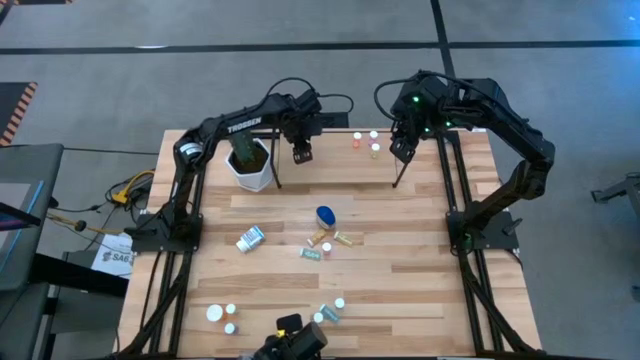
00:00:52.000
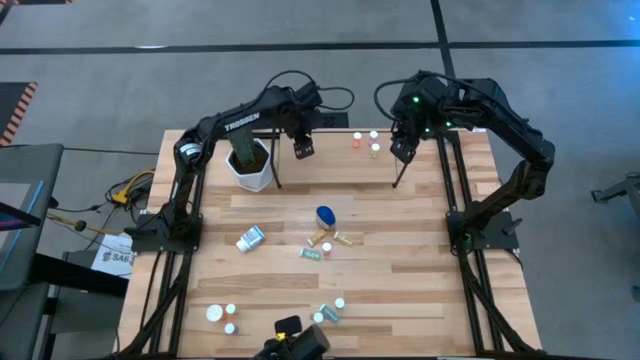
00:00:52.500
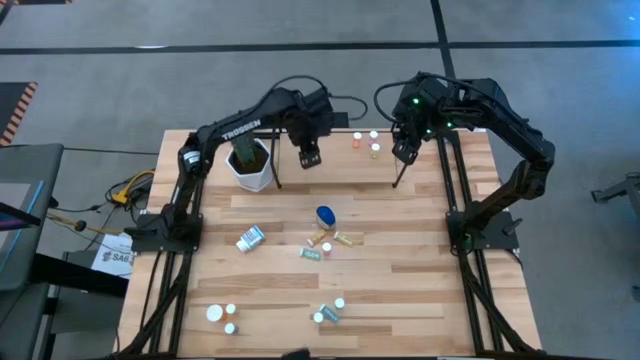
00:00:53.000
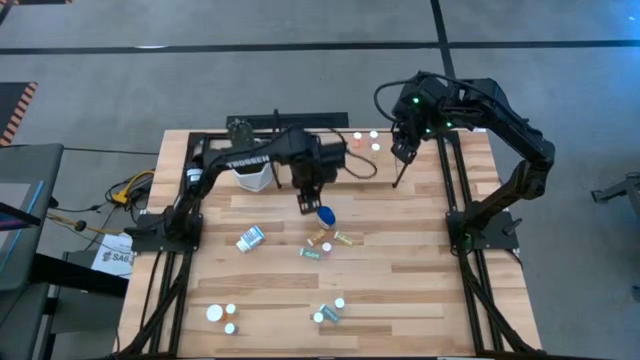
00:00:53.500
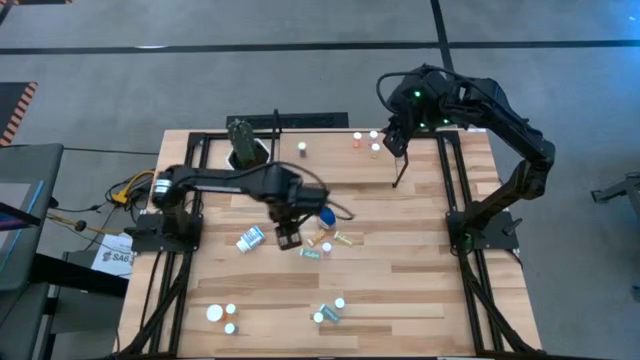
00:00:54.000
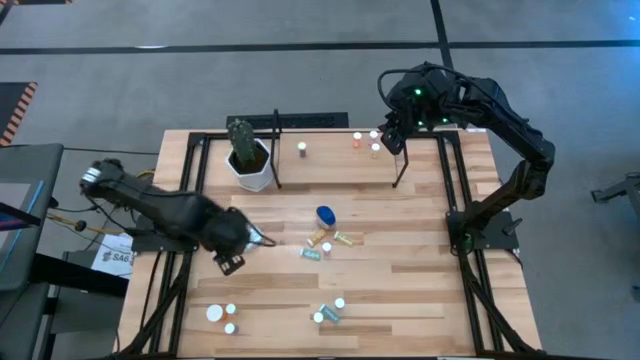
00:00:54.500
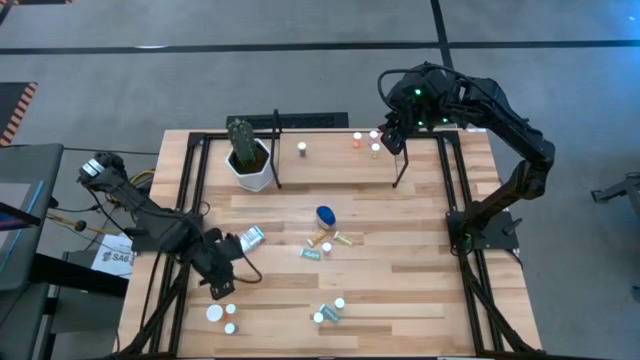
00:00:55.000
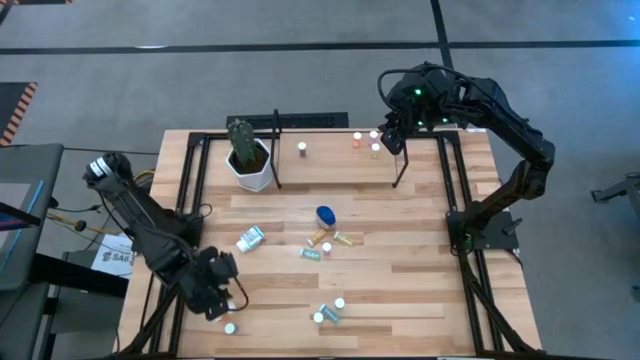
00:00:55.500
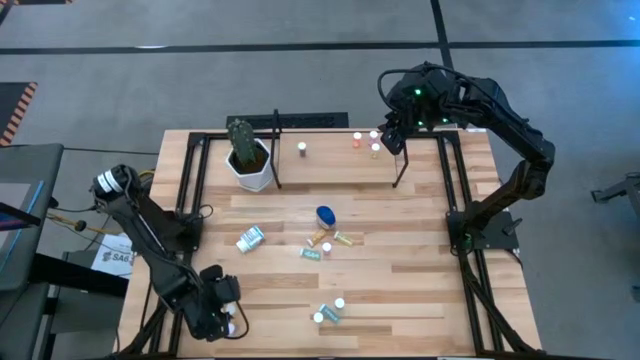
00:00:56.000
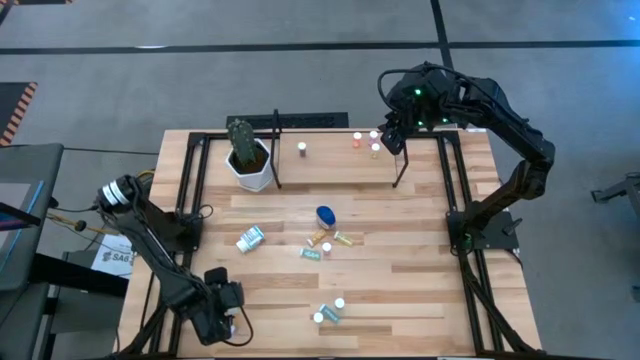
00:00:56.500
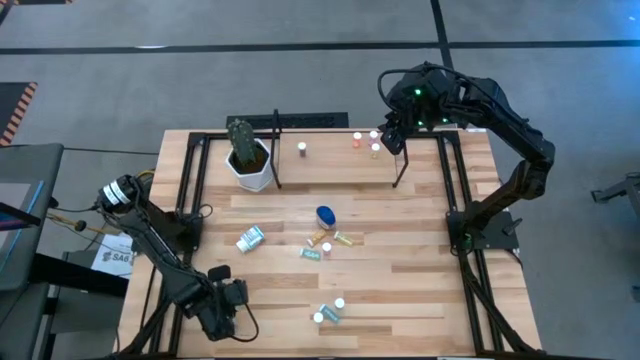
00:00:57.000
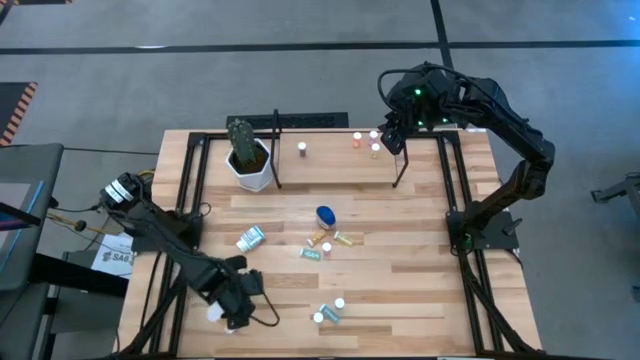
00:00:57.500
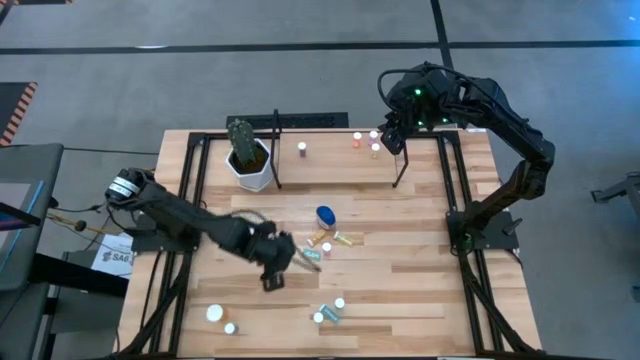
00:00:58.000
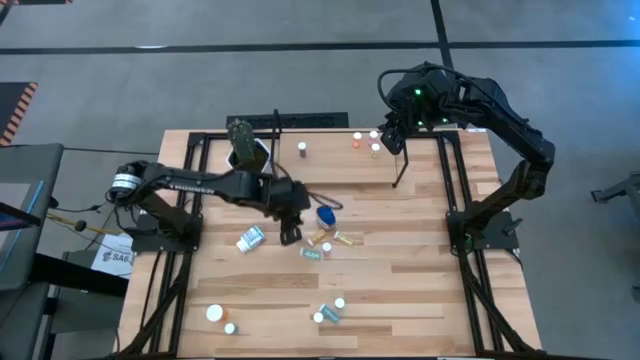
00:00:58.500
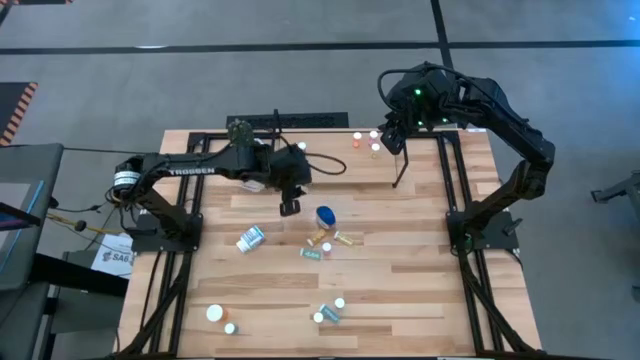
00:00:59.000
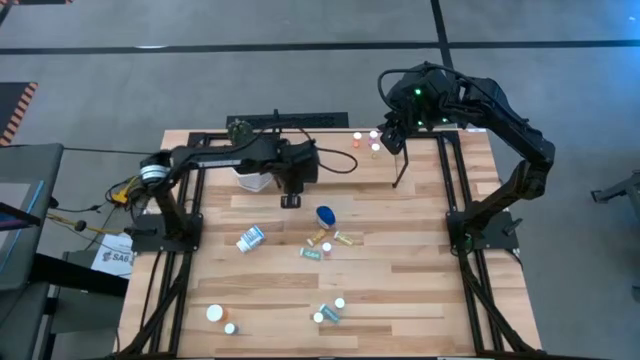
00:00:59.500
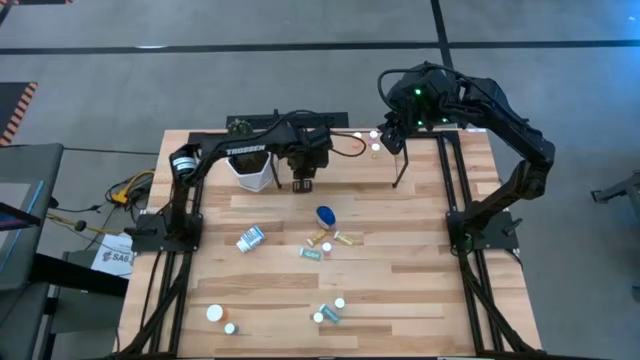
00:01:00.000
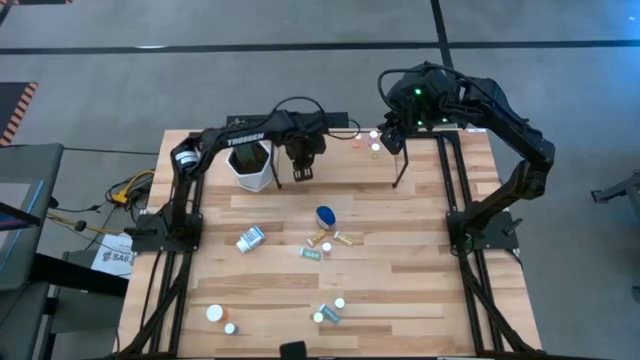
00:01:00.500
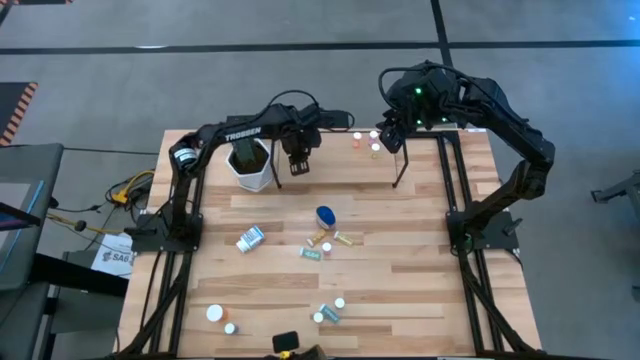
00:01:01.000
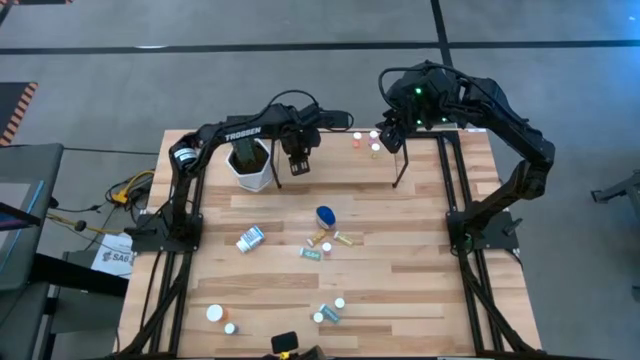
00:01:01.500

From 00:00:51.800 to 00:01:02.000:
Task: Pick and place medicine bottles onto shelf by color
Put the yellow pill bottle on the shelf

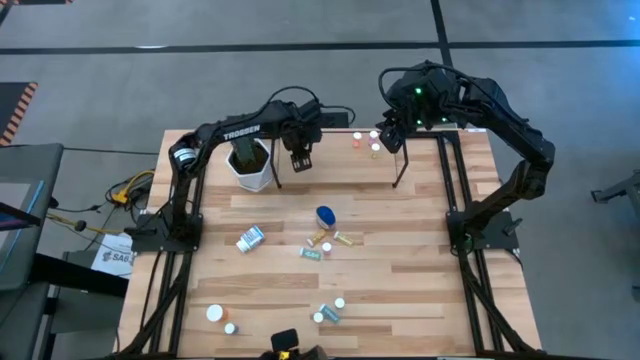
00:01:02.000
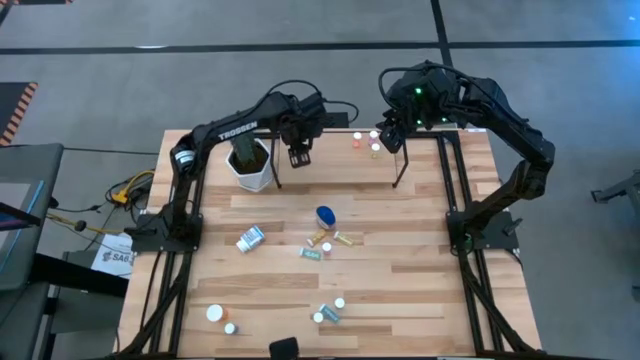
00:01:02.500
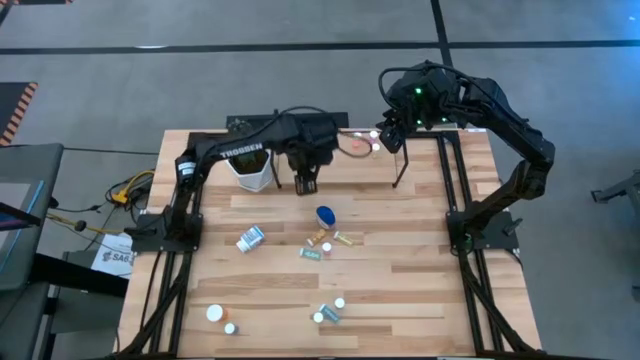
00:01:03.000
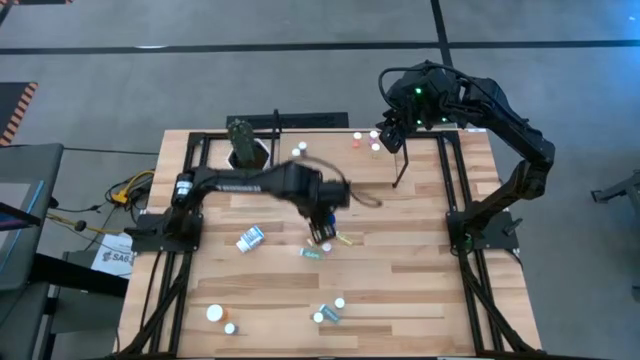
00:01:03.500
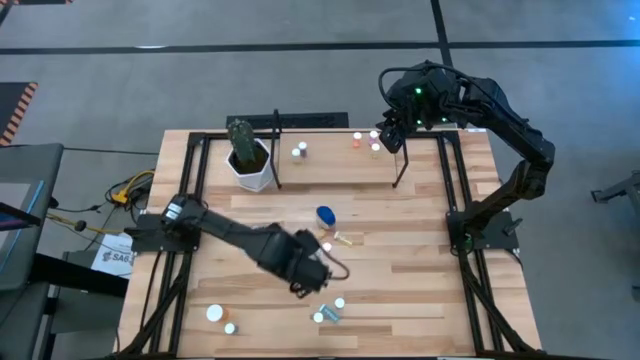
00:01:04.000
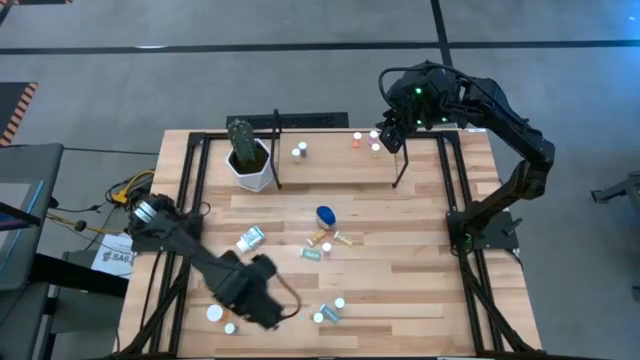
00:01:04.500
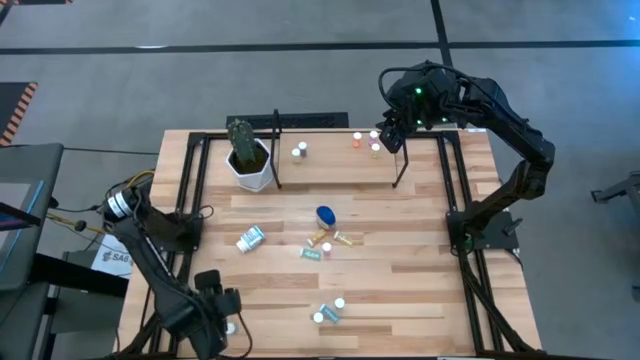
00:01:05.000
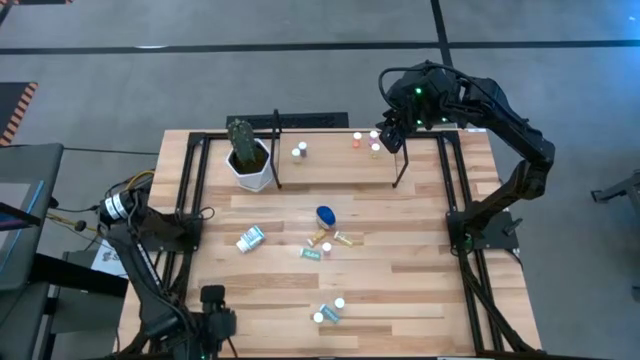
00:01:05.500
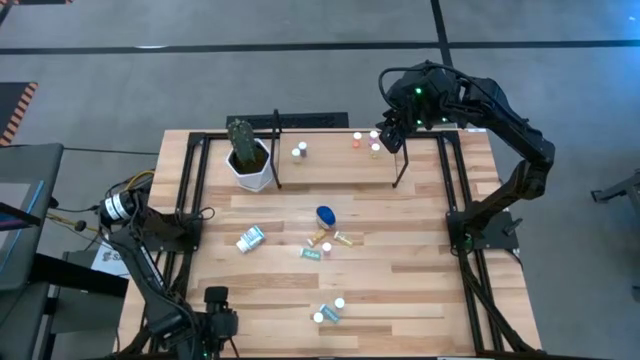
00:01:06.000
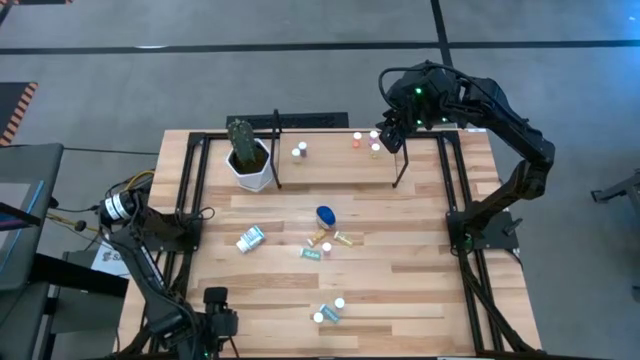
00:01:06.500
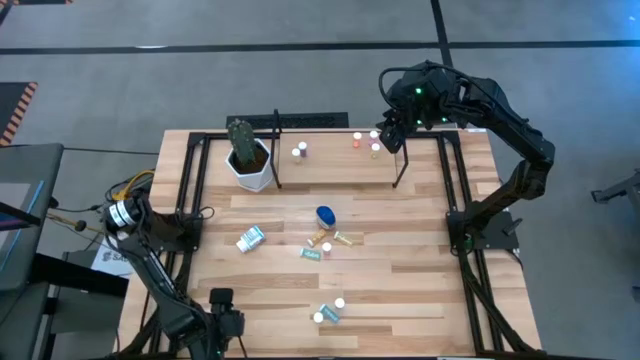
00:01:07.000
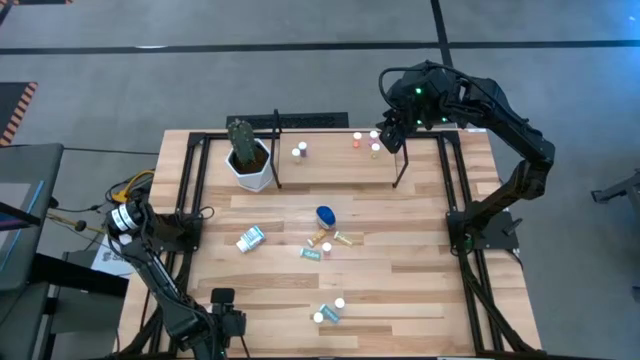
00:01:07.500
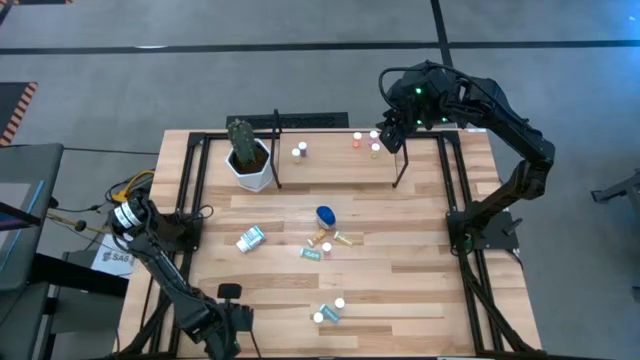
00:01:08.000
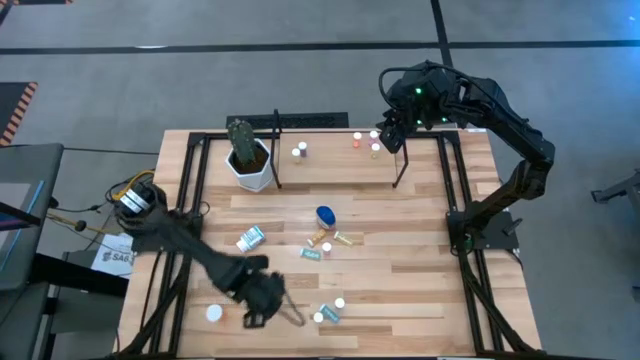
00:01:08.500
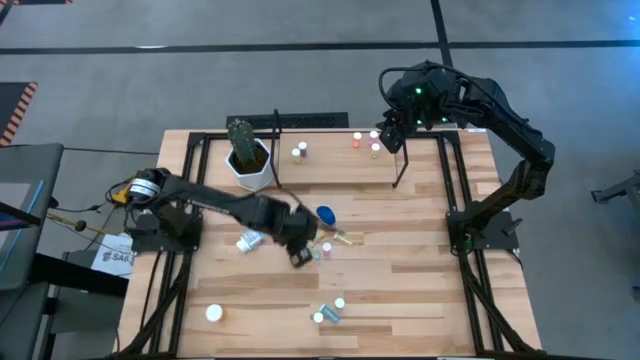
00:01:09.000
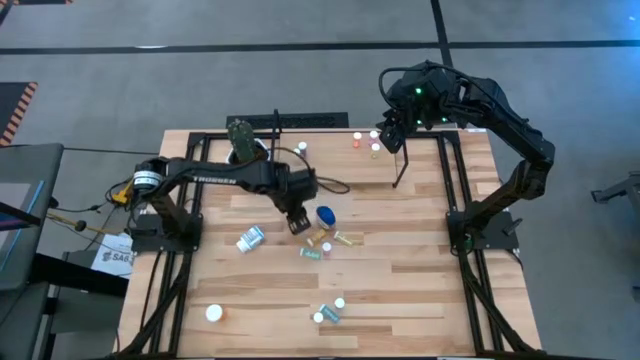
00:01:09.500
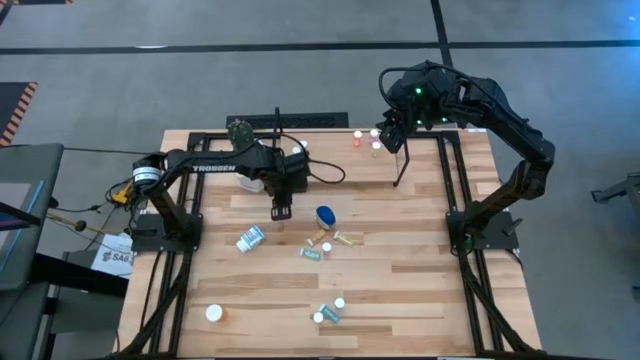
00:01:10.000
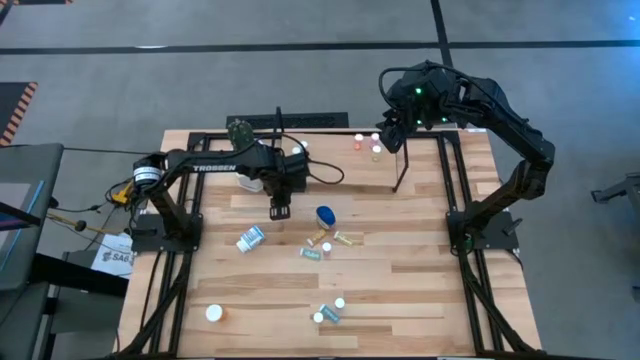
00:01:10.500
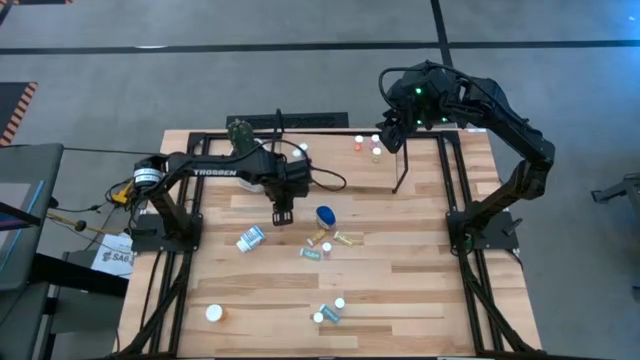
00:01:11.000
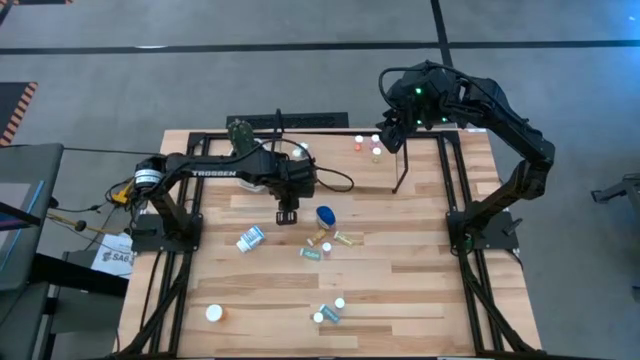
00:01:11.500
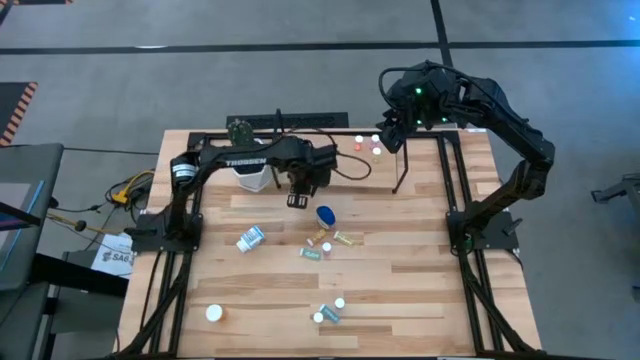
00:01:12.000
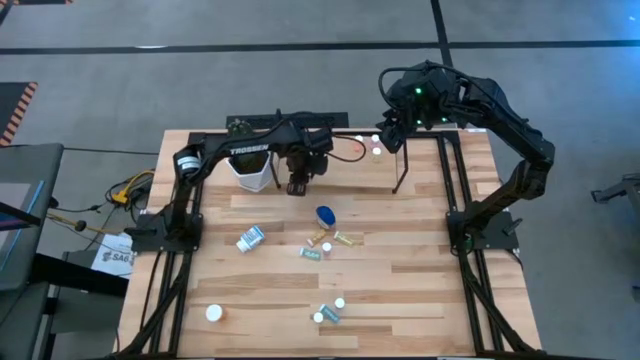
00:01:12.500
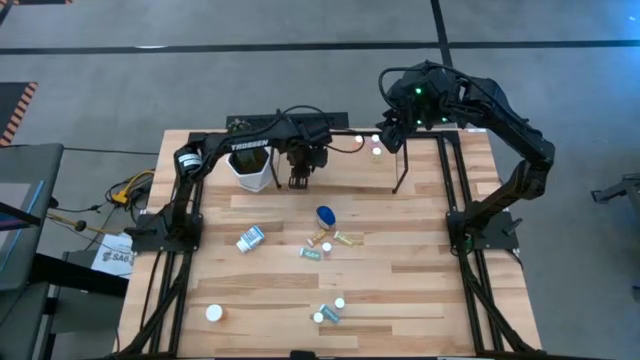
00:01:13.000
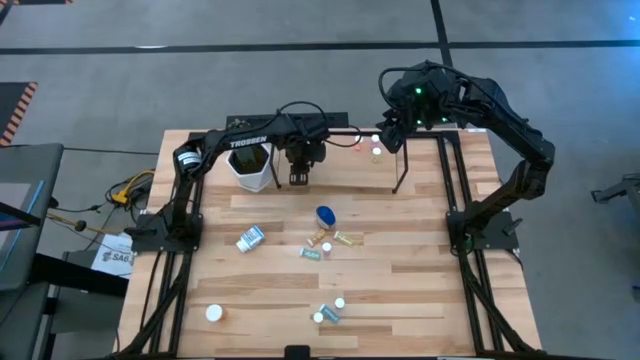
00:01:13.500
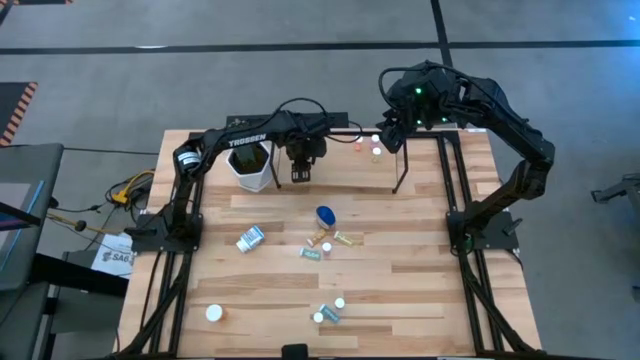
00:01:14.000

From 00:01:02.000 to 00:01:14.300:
Put the small blue pill bottle on the shelf

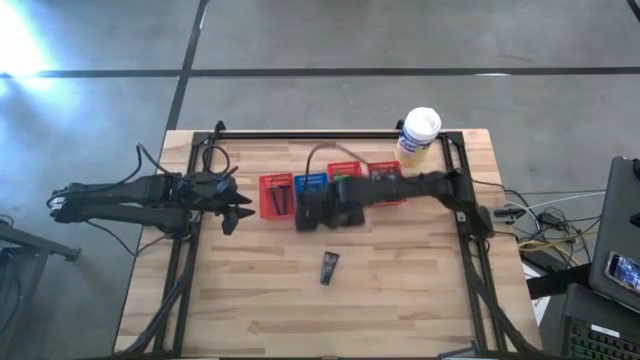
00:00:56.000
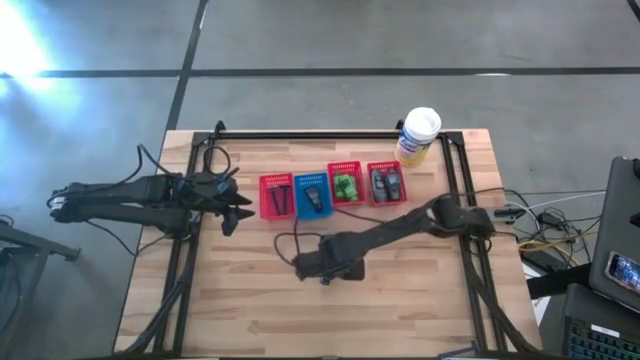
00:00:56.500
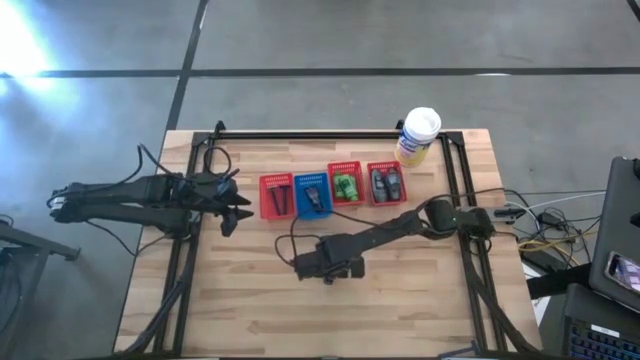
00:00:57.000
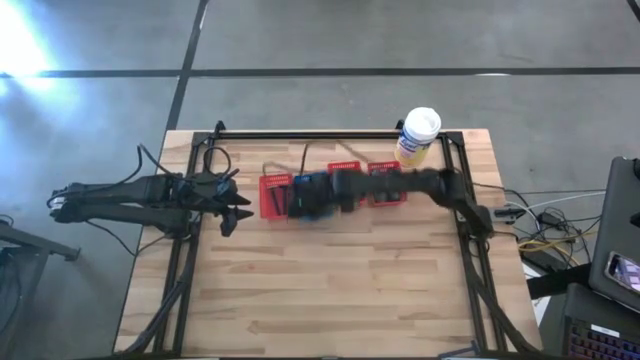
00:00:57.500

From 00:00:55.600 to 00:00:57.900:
Task: Pick & Place Travel size toiletries
Put the blue shave cream into the blue bin
